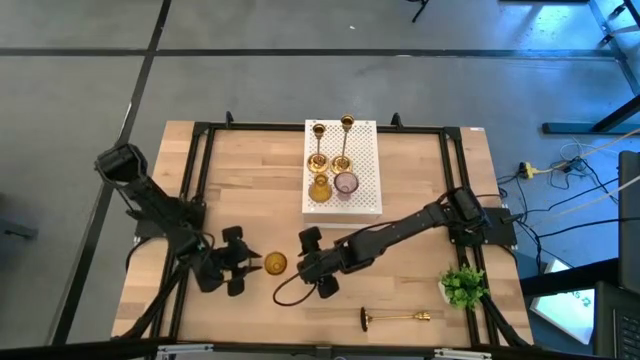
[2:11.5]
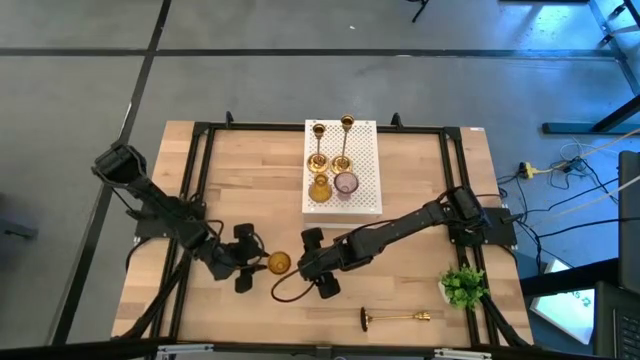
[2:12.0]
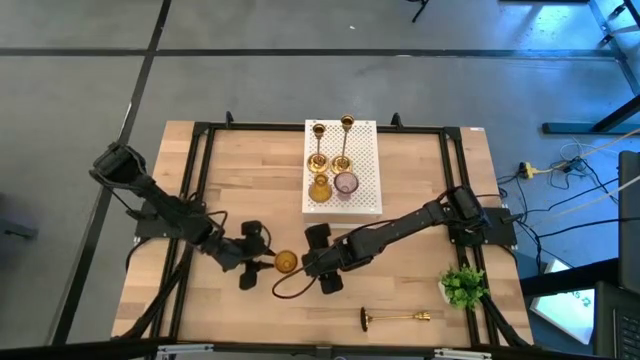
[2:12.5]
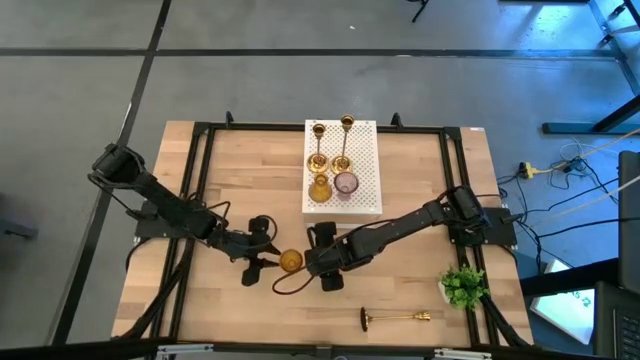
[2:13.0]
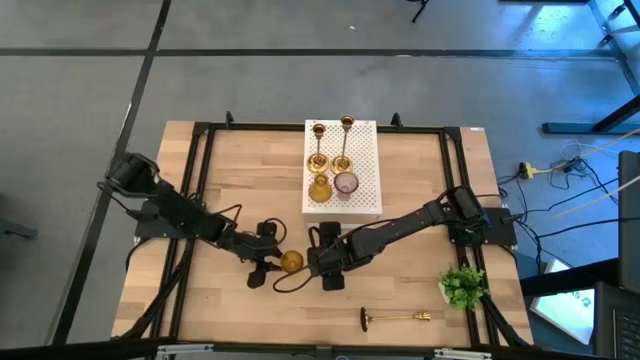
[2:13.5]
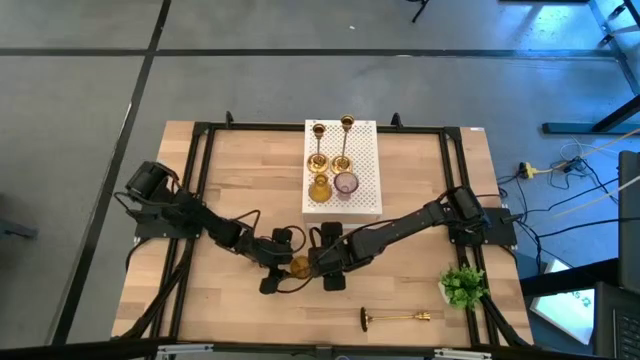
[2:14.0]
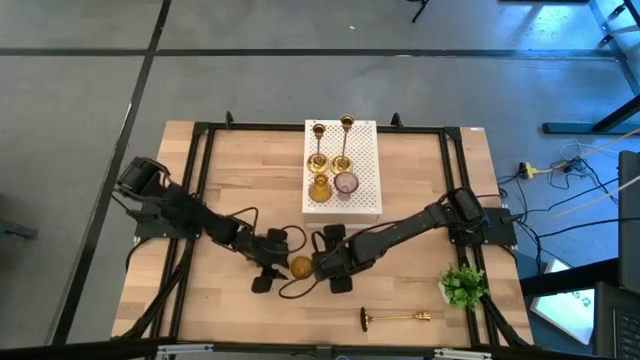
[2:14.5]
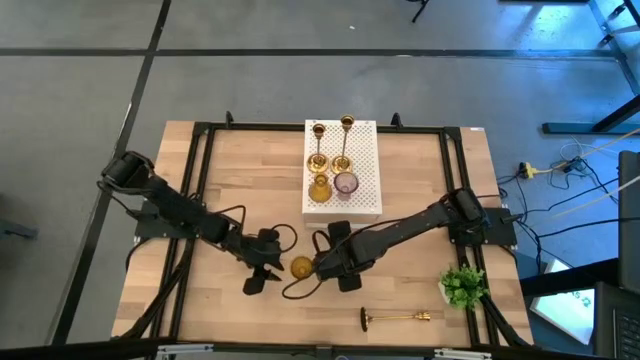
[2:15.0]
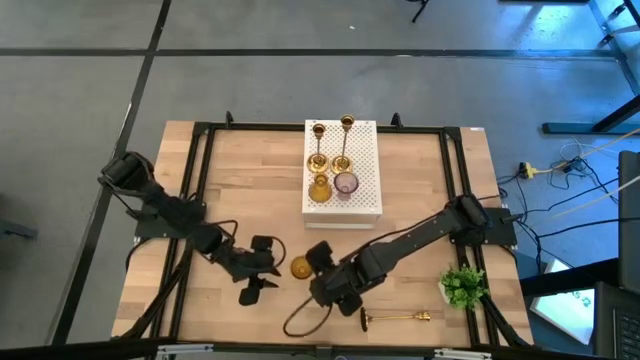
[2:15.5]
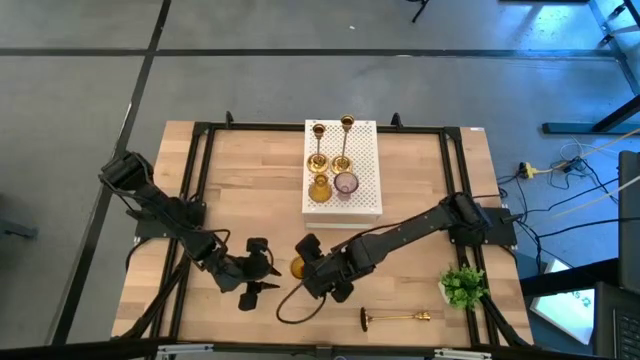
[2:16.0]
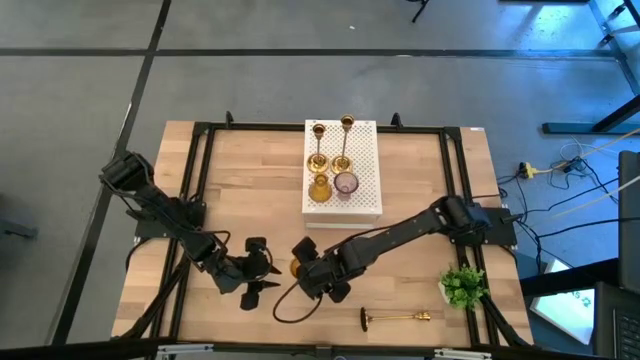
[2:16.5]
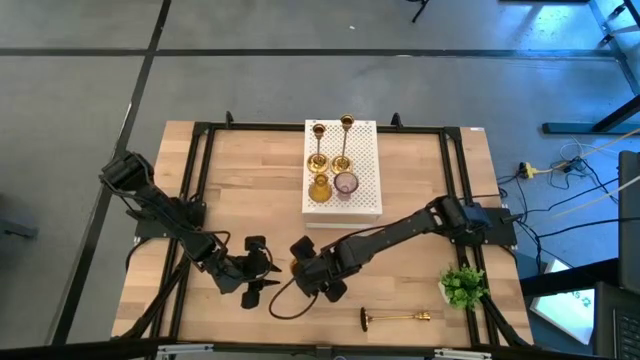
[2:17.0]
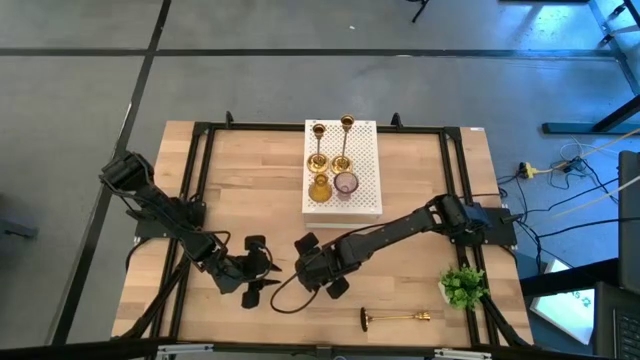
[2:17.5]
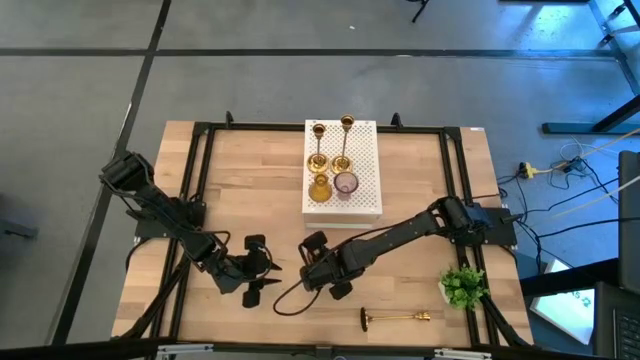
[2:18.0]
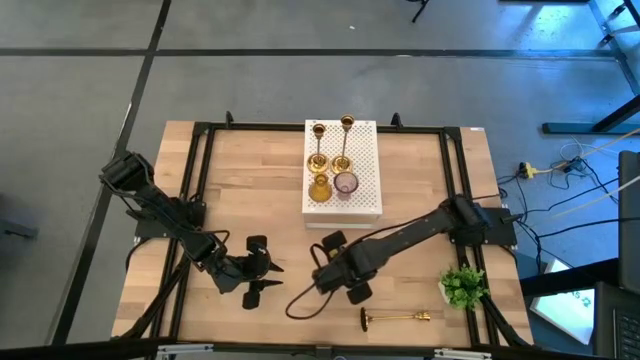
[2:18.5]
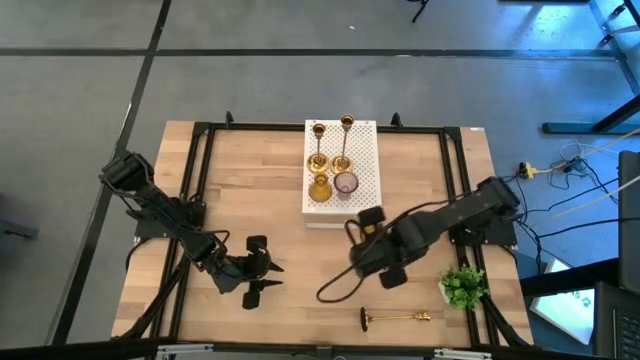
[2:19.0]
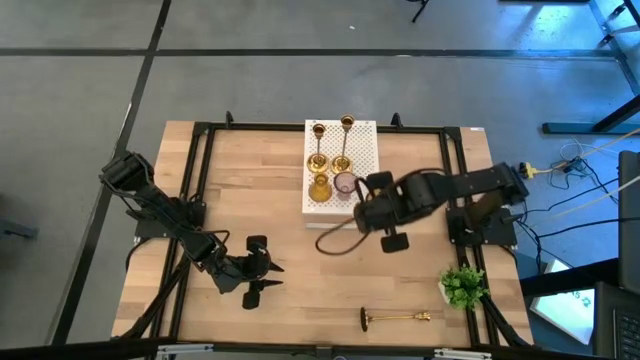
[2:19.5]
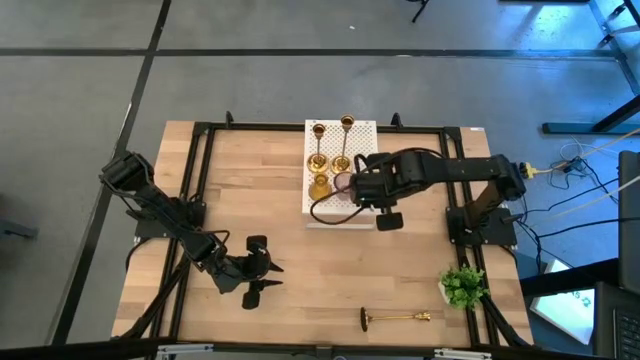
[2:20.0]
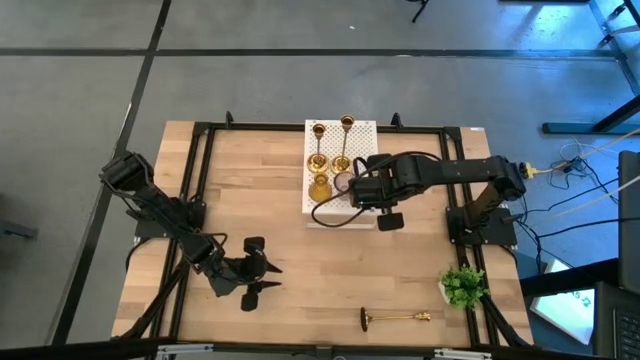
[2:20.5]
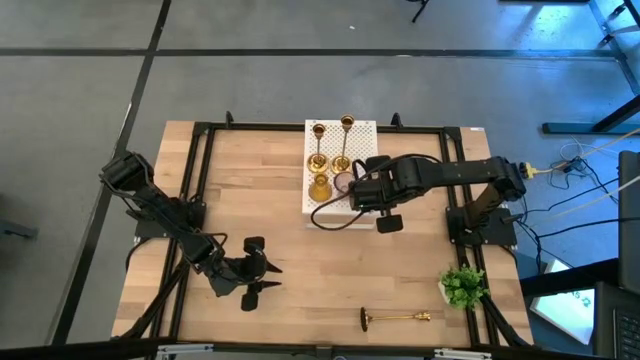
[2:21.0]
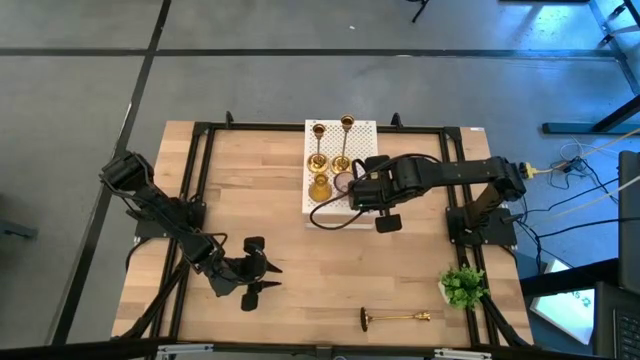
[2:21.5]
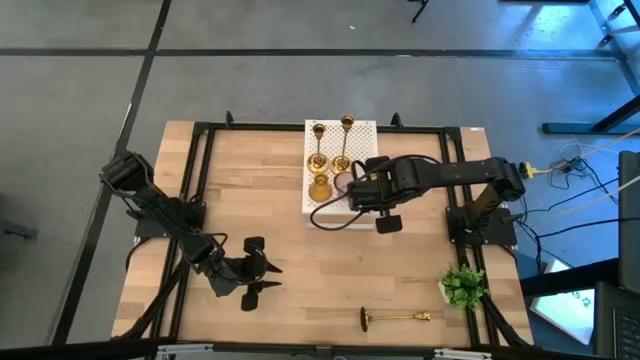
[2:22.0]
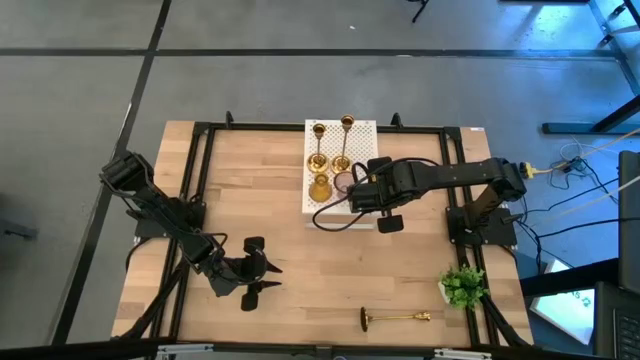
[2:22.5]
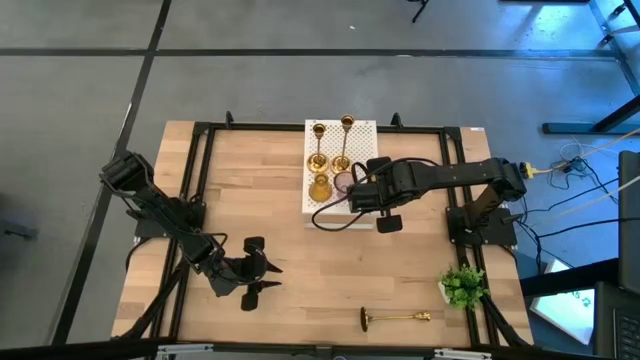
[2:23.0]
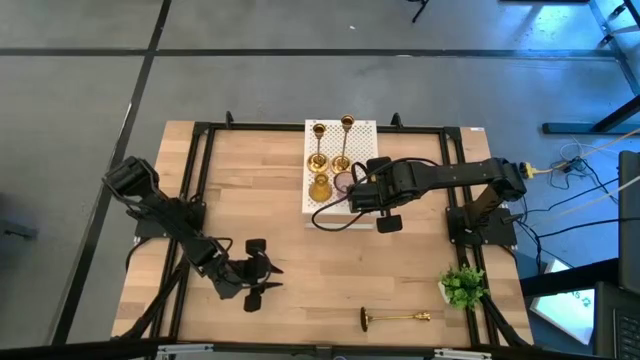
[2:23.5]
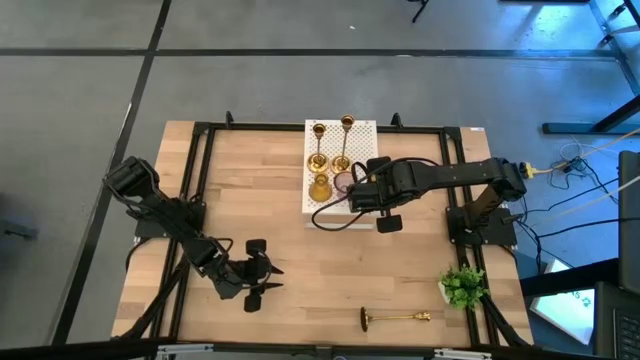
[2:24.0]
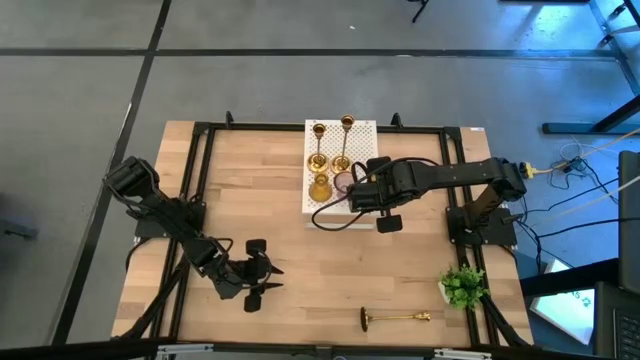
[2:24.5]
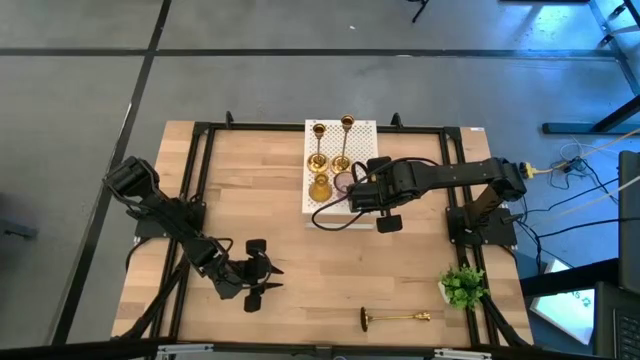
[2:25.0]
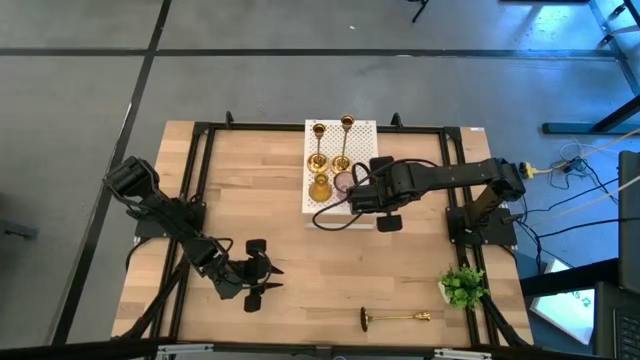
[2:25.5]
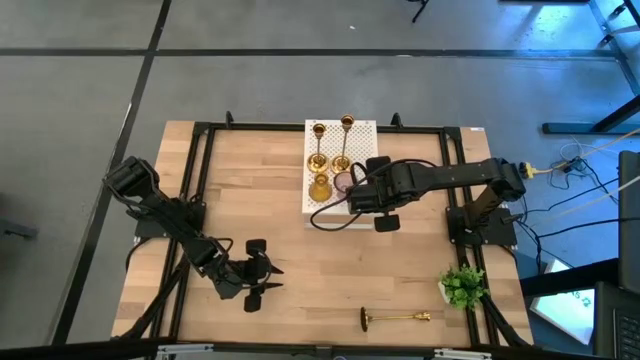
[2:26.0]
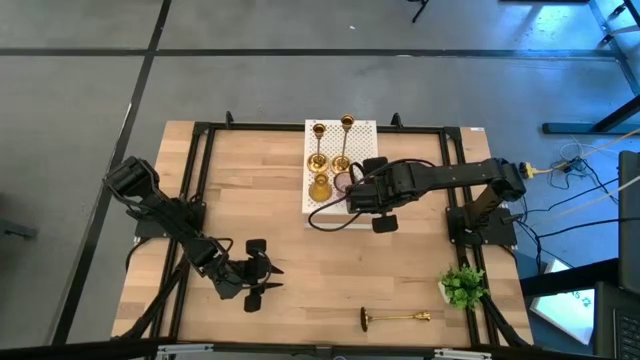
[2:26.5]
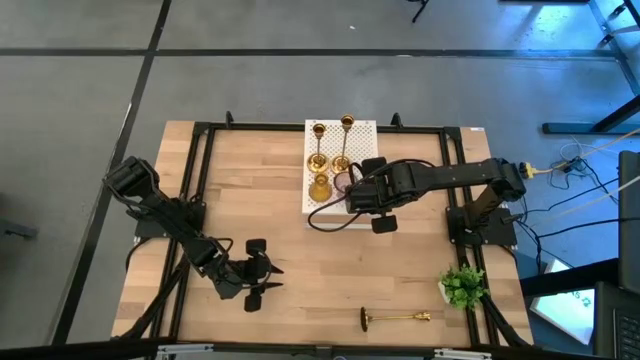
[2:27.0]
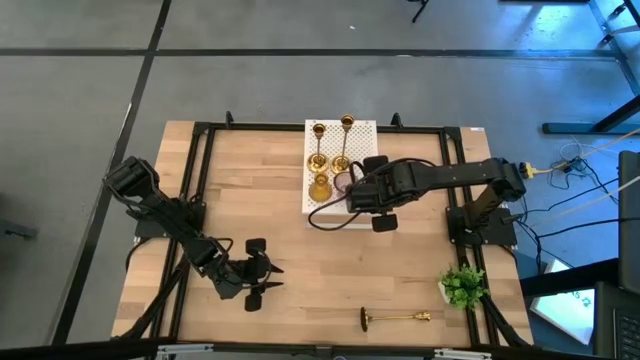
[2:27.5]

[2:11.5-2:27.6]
Task: Pick & Place candle stick holders
Put the yellow glass candlestick holder

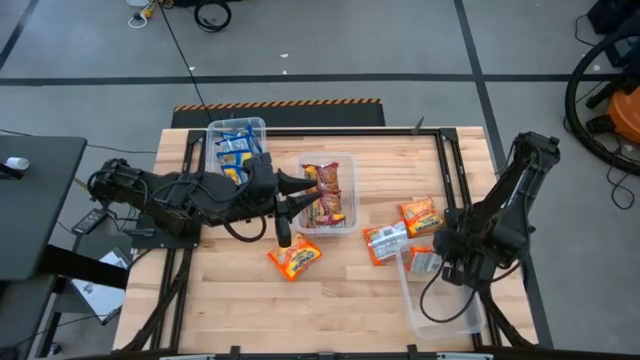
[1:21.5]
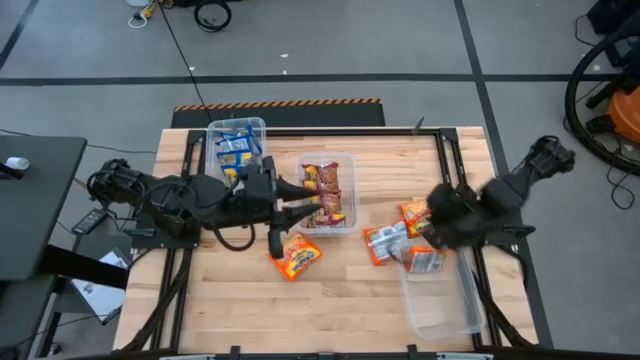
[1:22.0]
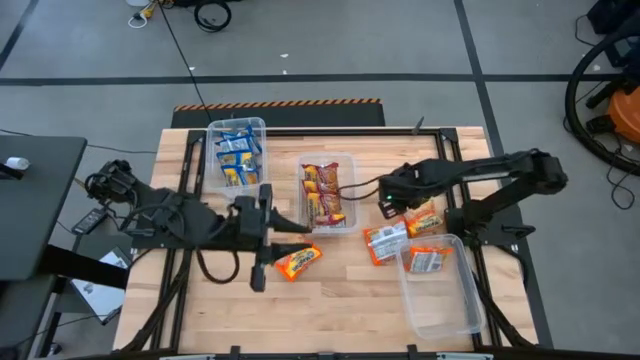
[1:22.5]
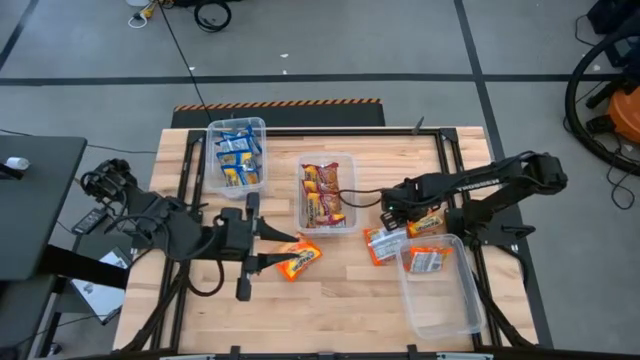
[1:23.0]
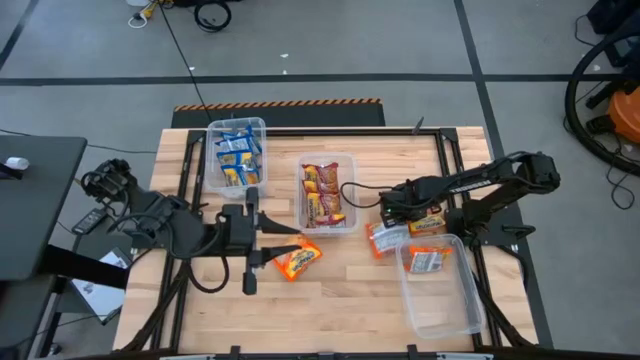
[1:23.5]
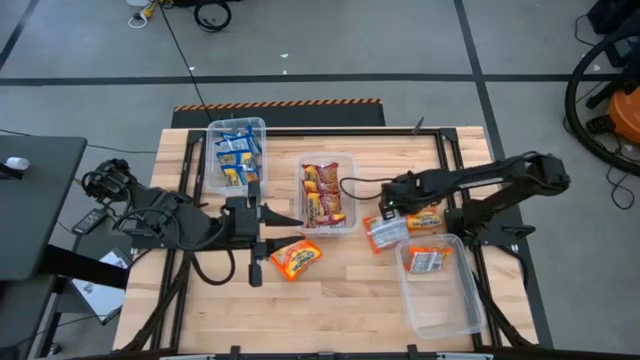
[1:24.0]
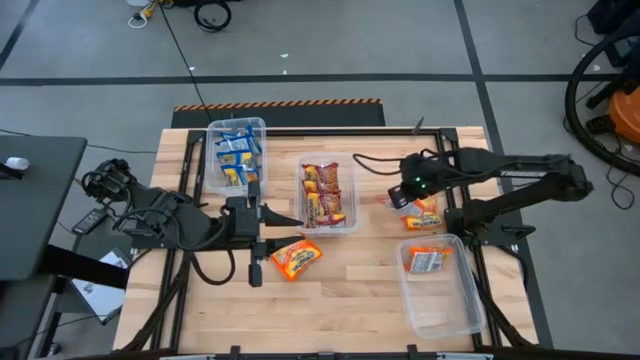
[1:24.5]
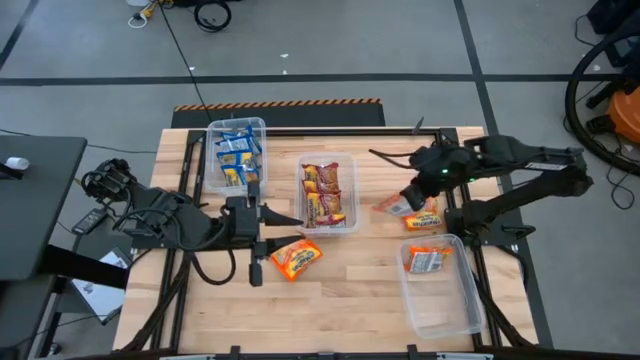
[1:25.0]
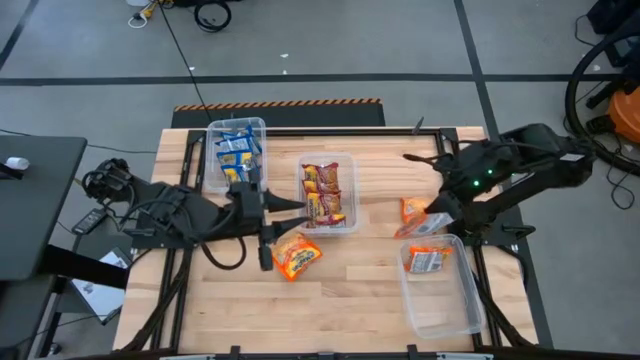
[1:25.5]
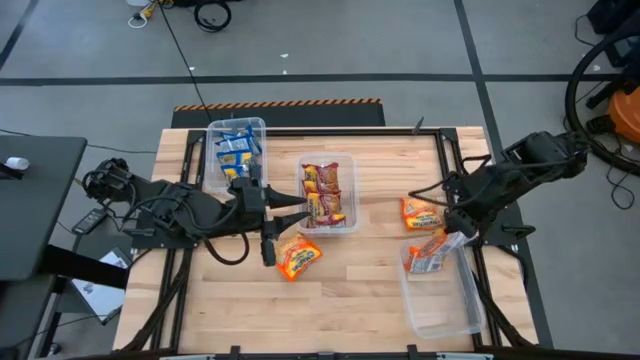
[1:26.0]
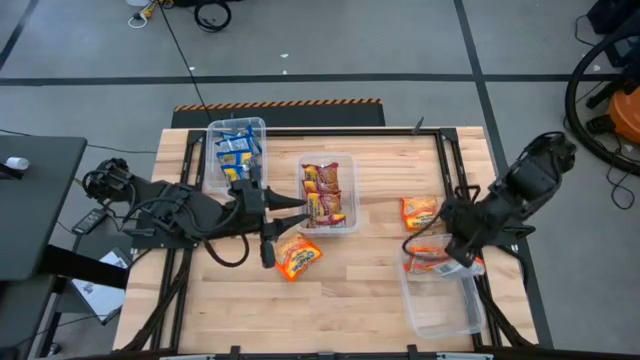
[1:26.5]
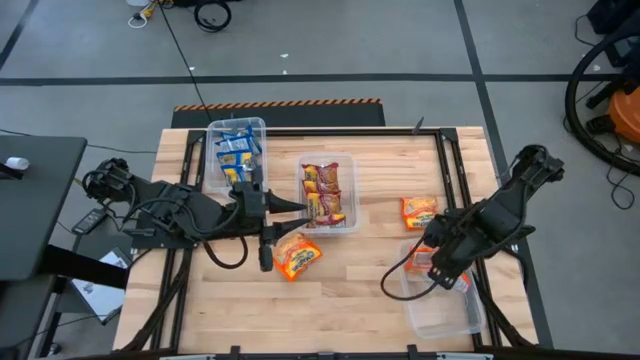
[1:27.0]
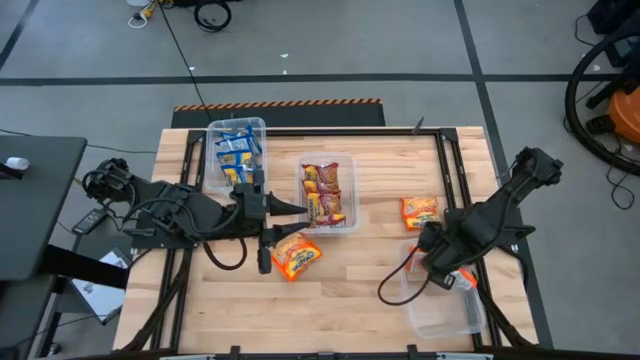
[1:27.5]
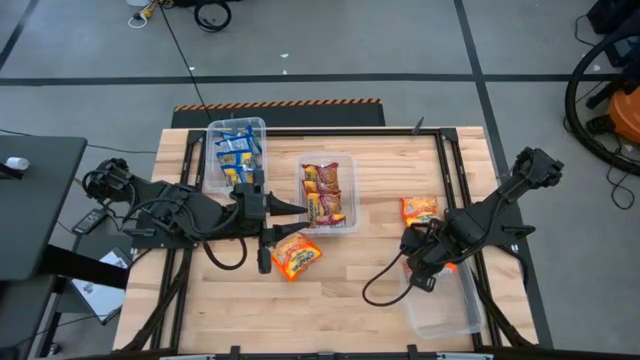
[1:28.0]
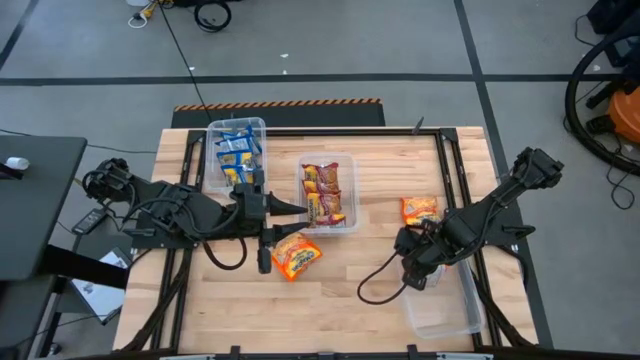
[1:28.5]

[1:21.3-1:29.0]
Task: Sort Maruchan noodles
Put the orange noodle pack into the bottom transparent bin
